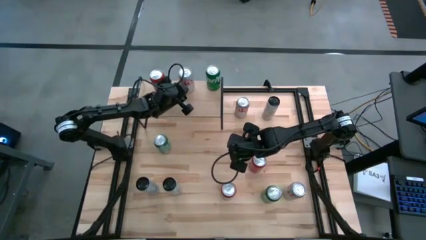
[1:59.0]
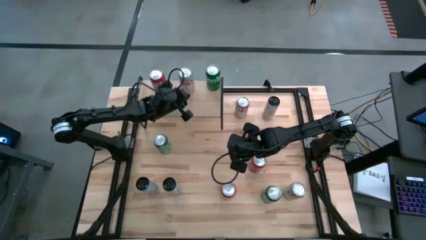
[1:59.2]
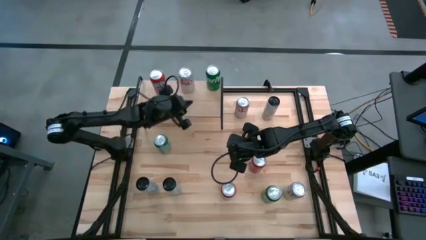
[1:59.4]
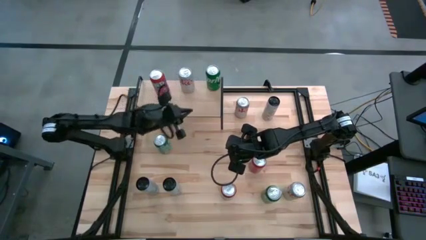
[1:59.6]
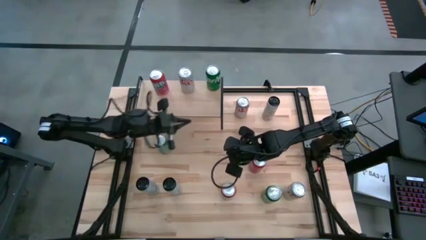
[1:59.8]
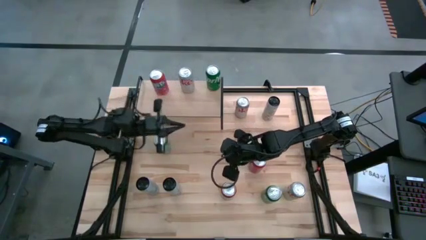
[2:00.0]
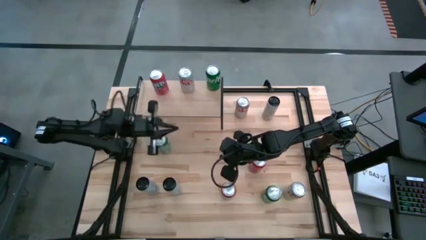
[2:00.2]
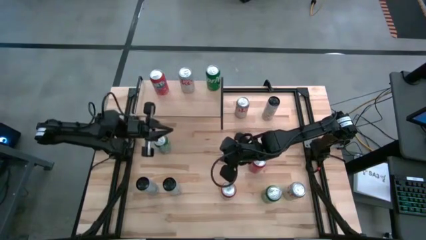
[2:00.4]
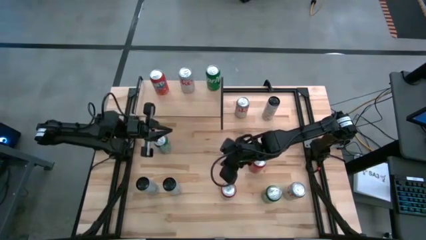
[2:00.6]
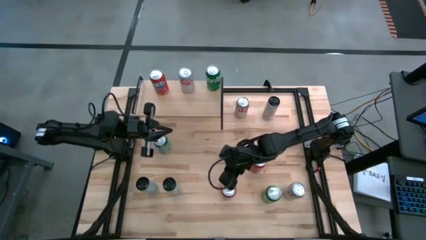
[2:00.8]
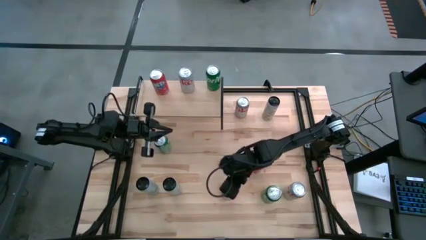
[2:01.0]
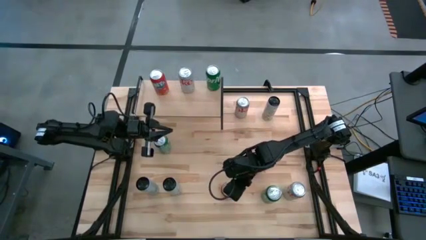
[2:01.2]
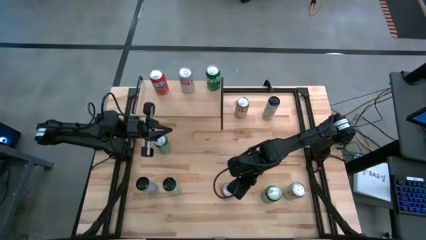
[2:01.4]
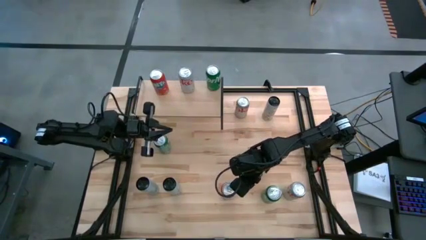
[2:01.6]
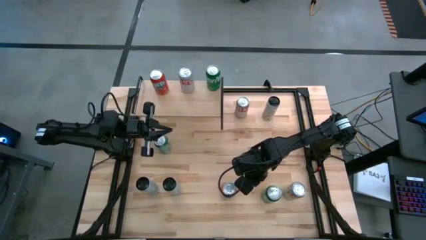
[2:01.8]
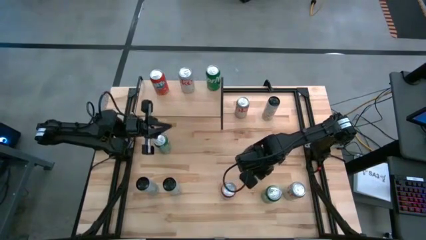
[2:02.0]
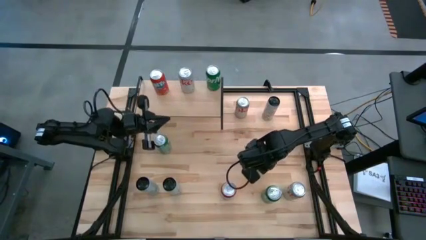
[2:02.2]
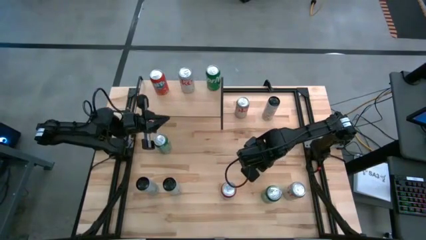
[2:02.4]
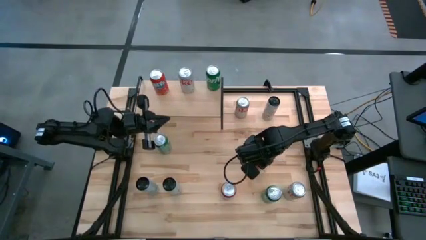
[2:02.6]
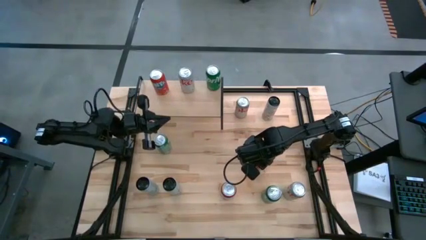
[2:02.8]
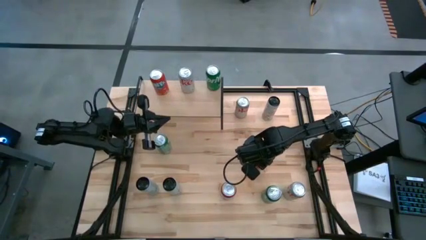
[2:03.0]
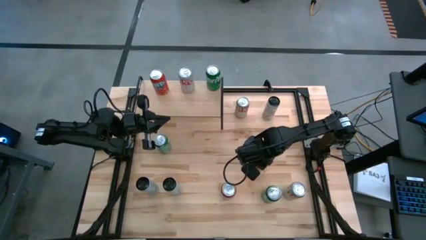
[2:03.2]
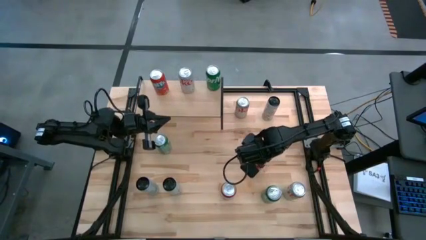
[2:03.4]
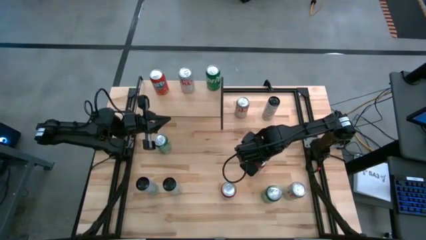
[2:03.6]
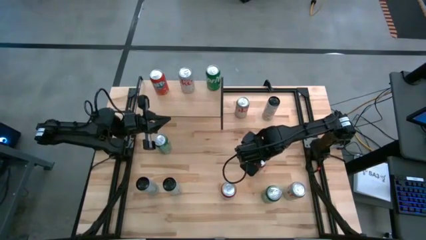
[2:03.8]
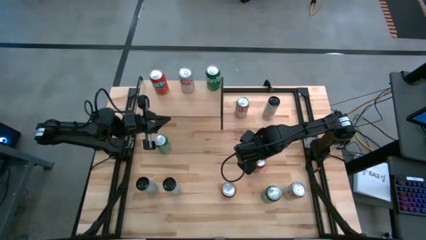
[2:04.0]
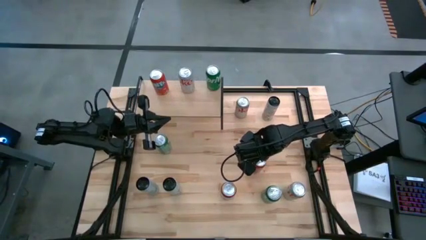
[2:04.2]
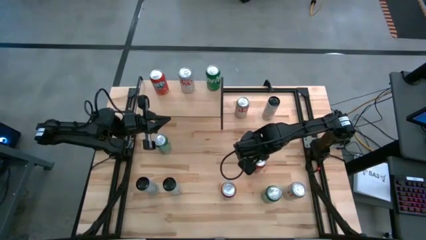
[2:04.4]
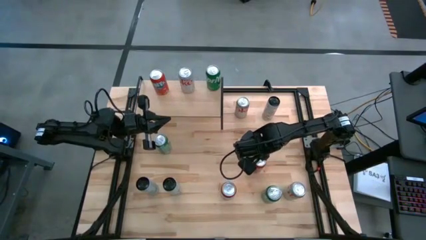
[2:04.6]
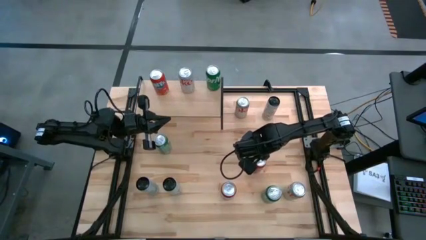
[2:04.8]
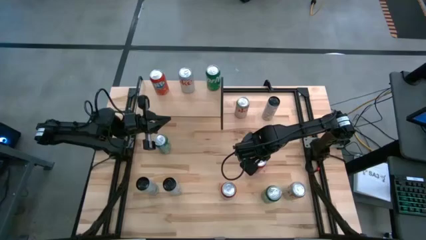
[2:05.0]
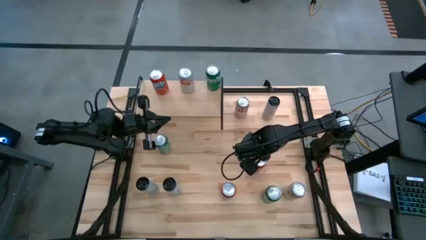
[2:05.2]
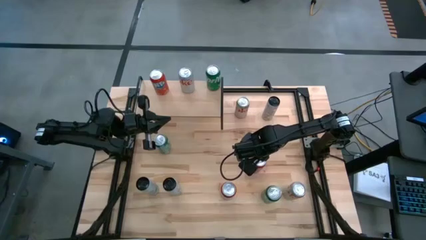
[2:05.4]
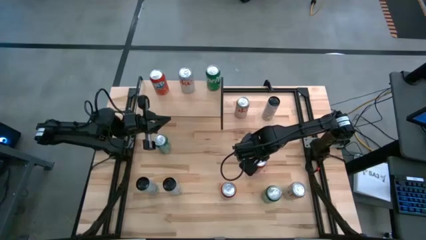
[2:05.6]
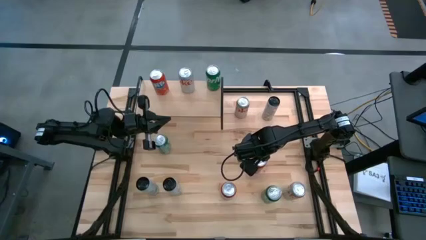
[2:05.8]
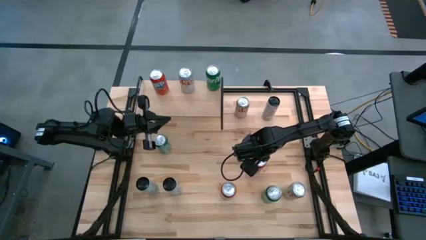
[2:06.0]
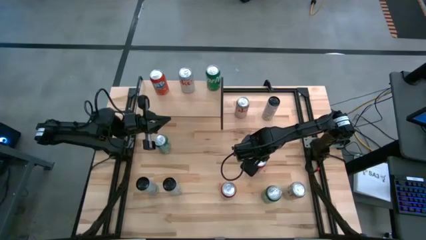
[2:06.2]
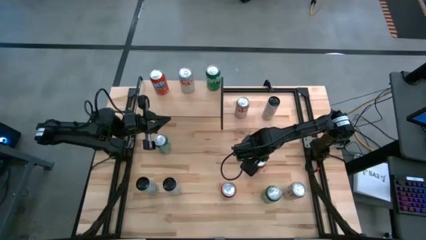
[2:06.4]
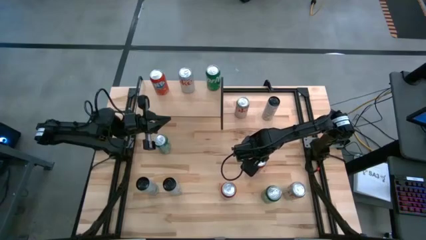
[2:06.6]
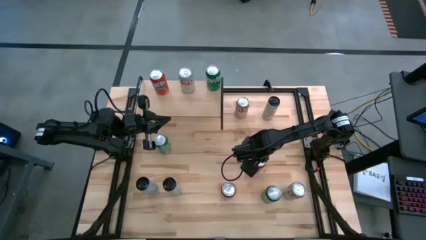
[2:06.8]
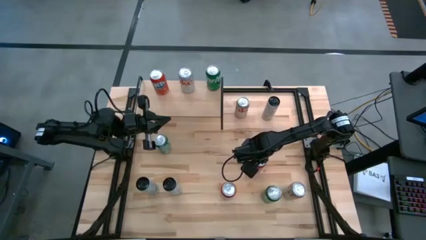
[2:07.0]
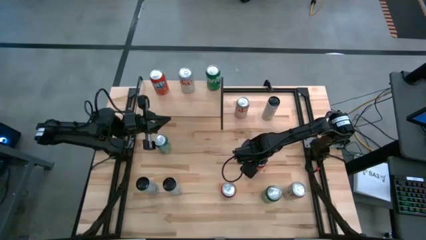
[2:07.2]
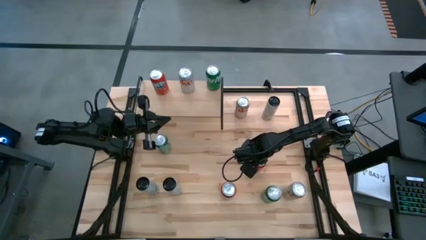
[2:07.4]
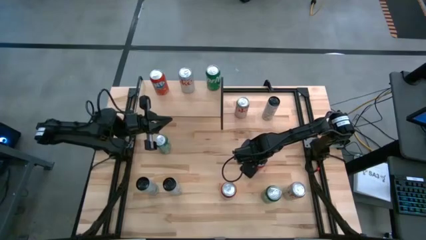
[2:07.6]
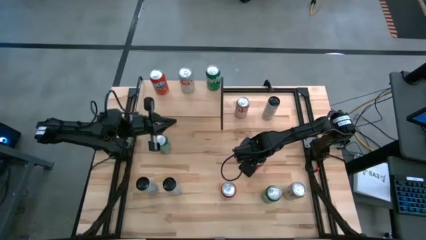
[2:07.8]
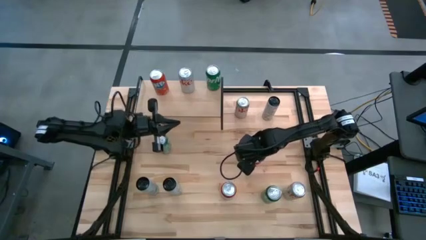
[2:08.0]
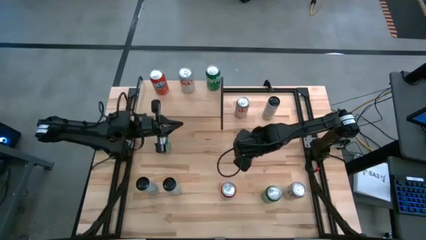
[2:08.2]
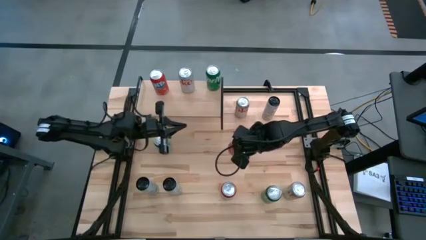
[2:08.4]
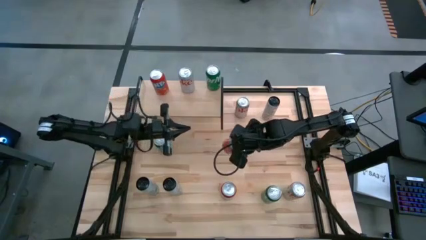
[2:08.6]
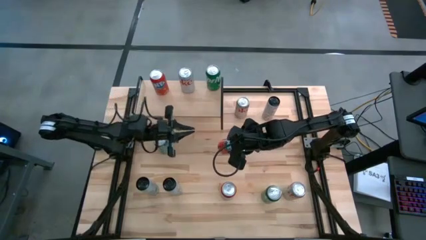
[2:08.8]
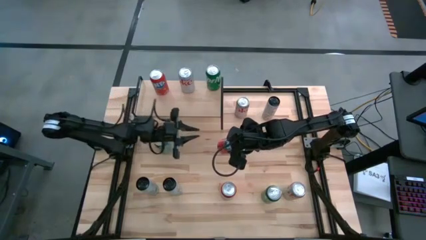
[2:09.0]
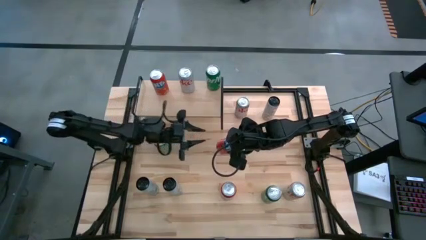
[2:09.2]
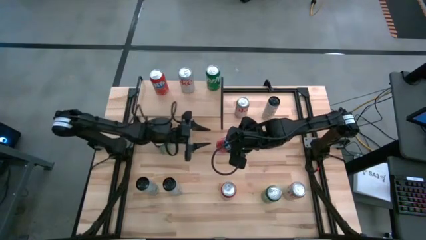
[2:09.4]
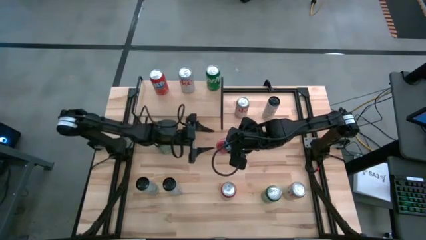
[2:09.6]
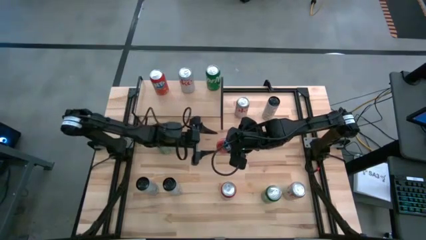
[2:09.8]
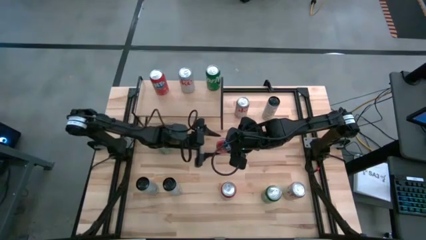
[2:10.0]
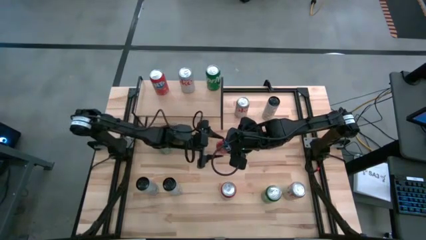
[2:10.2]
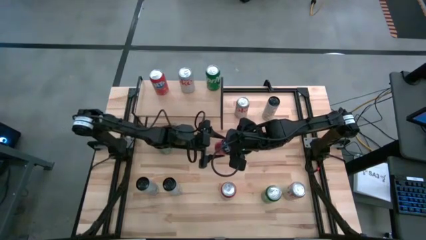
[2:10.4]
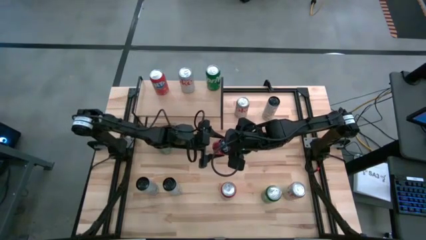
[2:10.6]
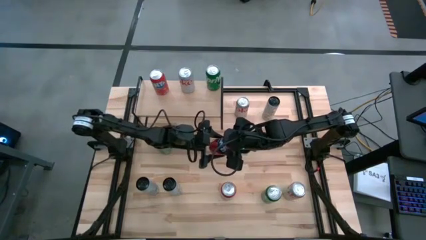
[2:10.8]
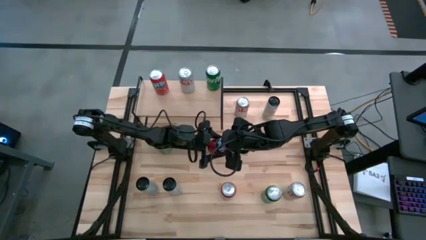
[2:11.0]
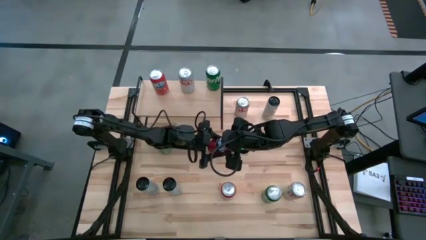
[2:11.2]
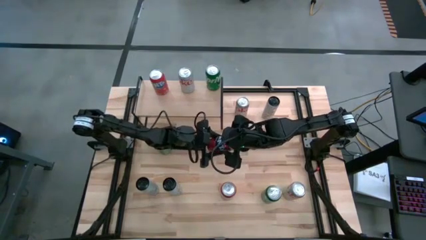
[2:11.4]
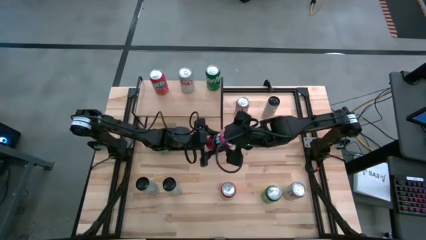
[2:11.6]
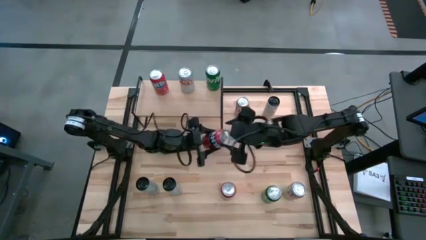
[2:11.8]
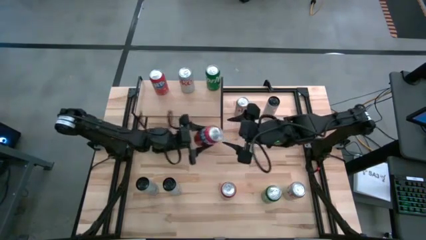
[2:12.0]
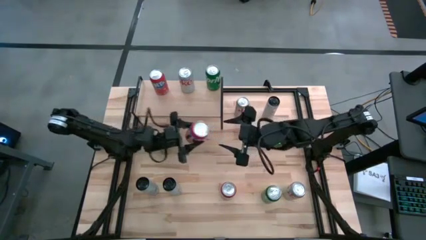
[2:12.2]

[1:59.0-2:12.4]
Task: Place canned beverage on shelf
Put the top red soda can aligned with the other red soda can on the shelf
